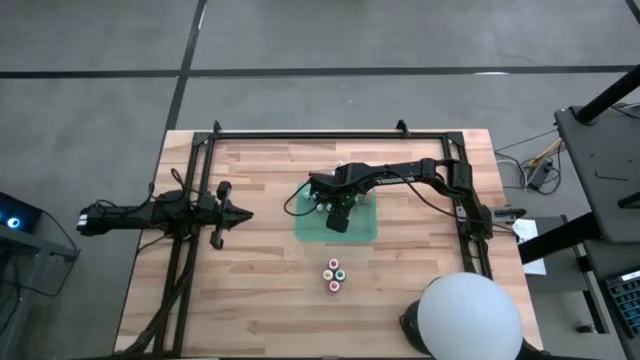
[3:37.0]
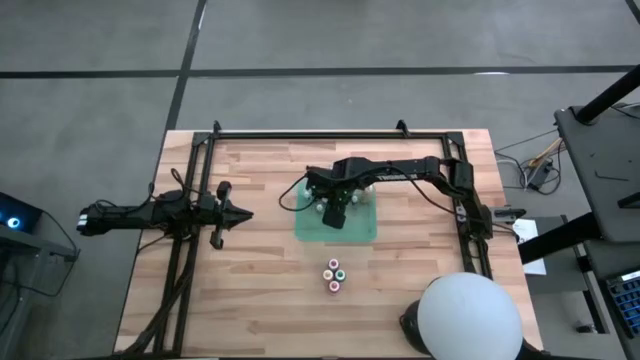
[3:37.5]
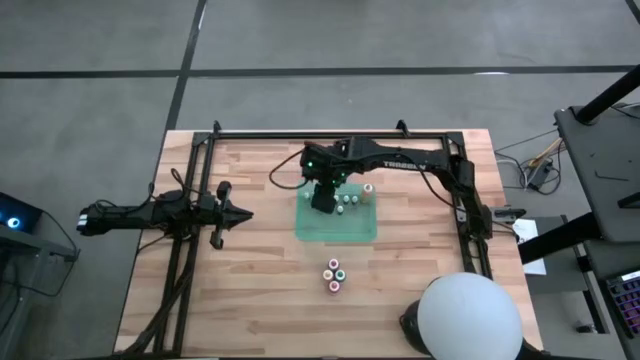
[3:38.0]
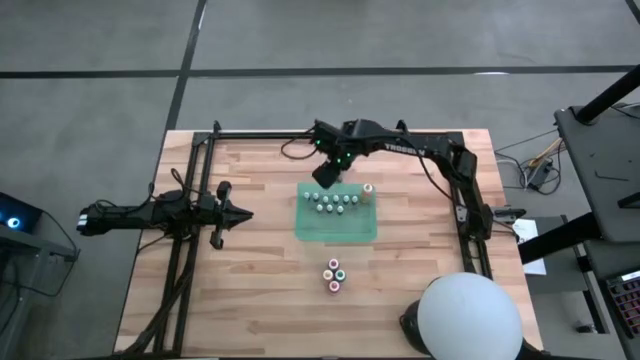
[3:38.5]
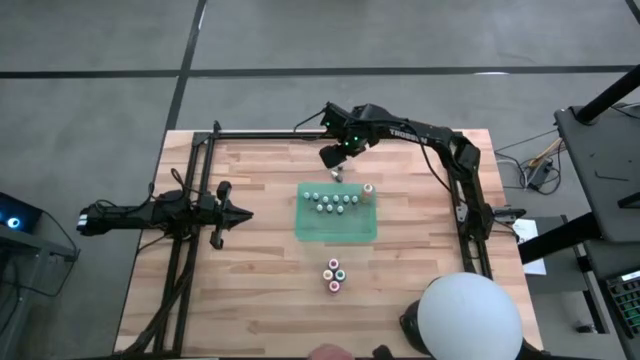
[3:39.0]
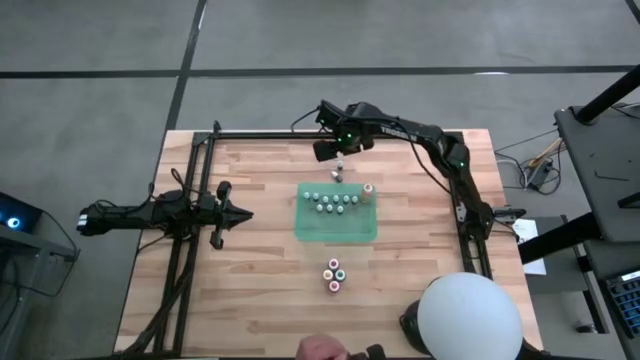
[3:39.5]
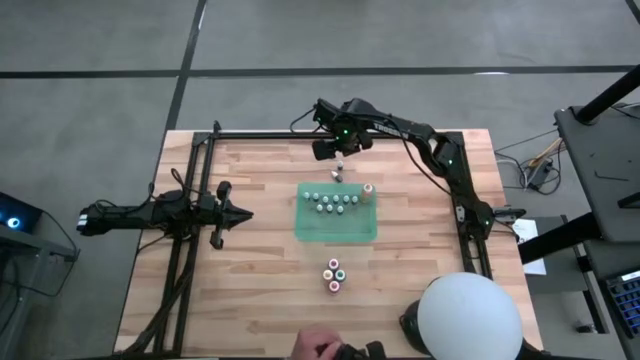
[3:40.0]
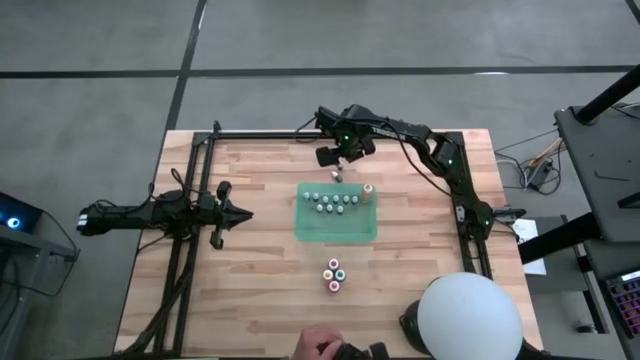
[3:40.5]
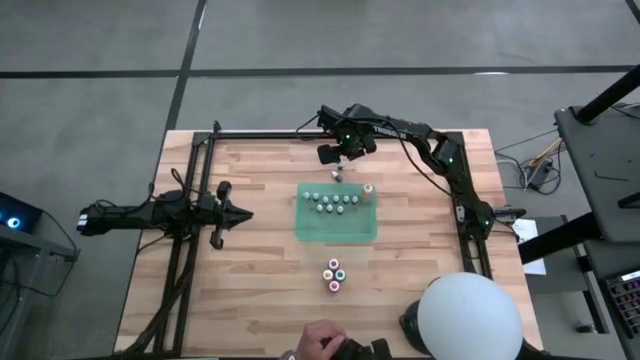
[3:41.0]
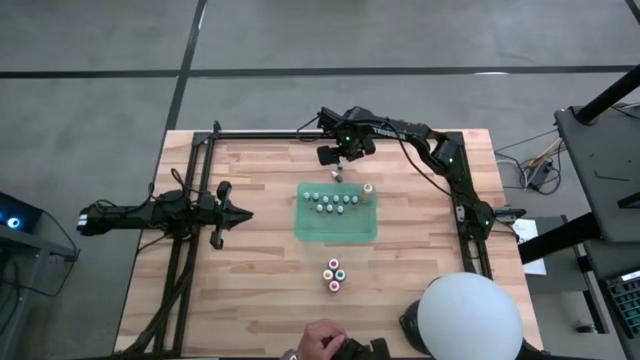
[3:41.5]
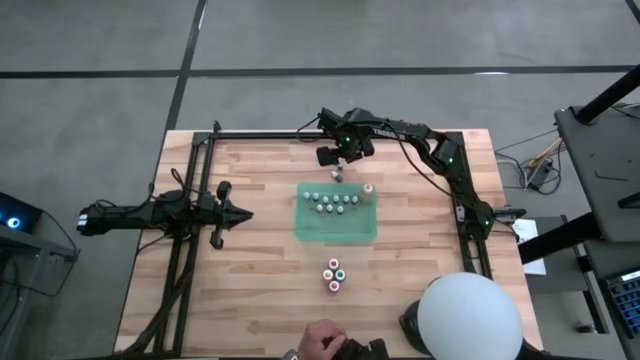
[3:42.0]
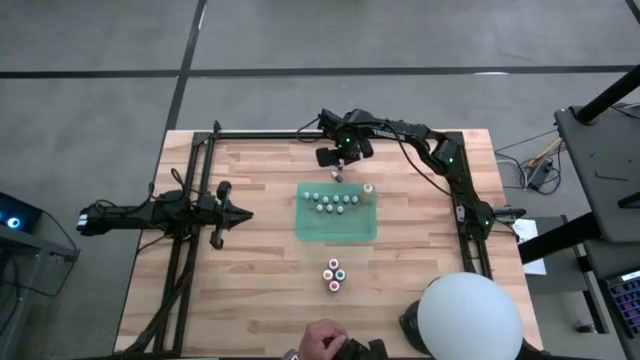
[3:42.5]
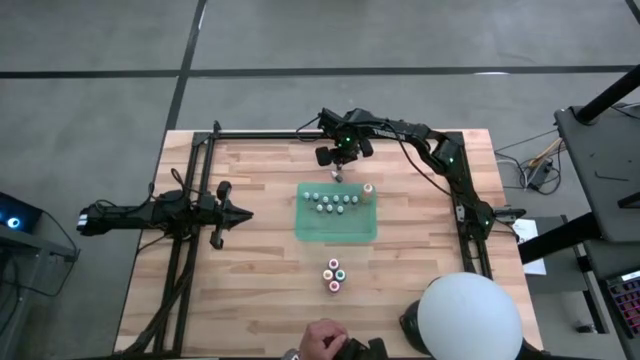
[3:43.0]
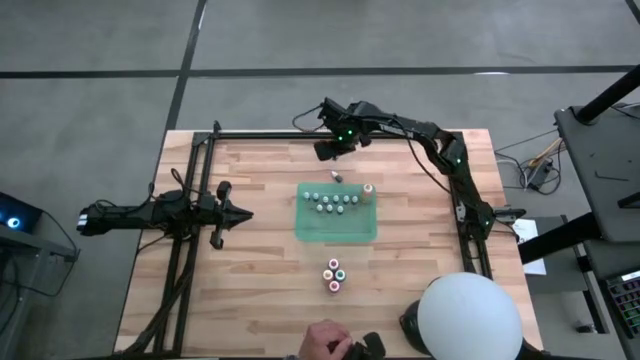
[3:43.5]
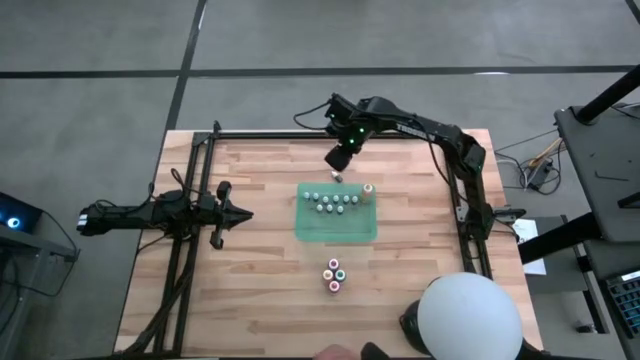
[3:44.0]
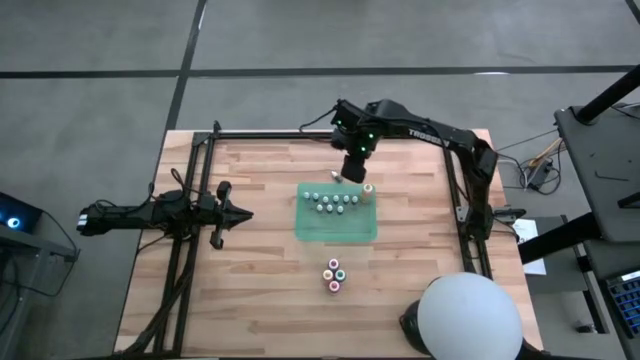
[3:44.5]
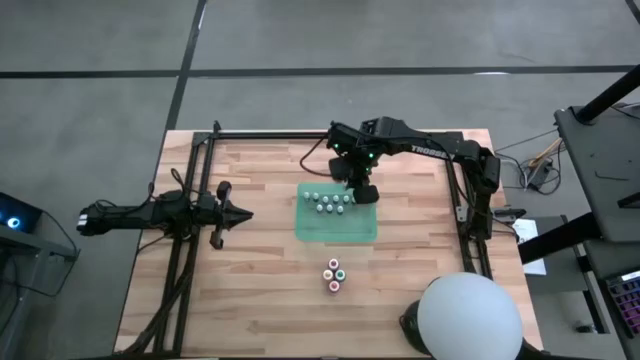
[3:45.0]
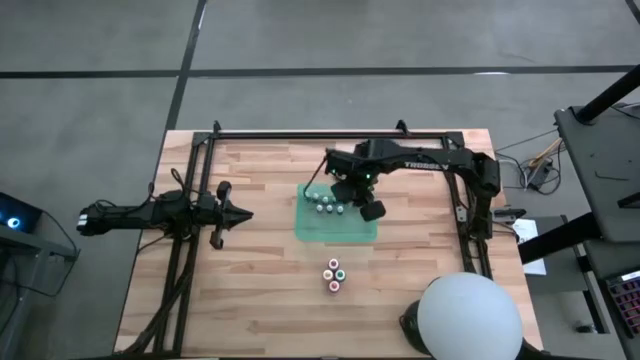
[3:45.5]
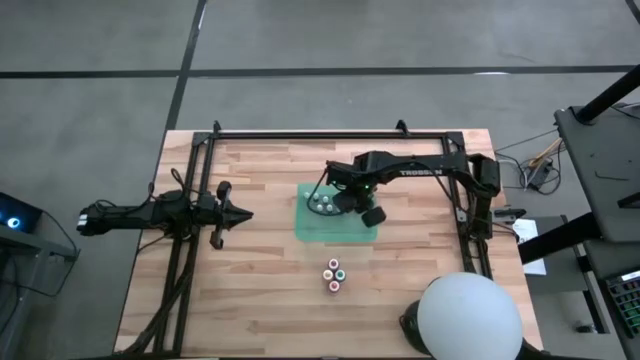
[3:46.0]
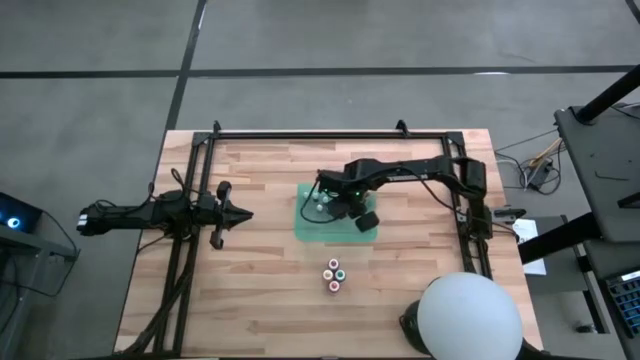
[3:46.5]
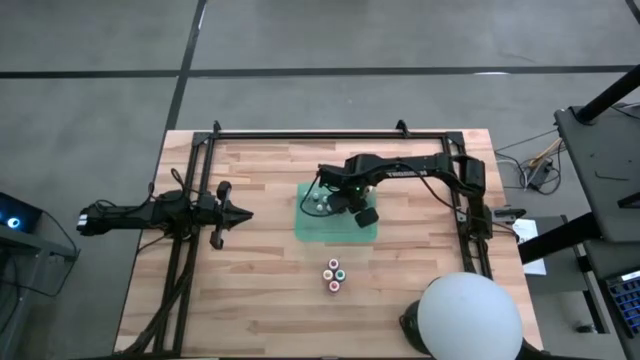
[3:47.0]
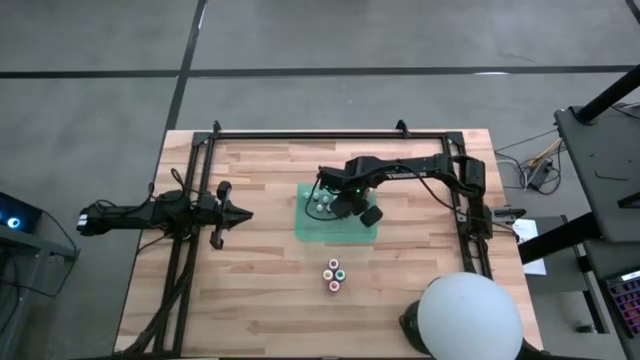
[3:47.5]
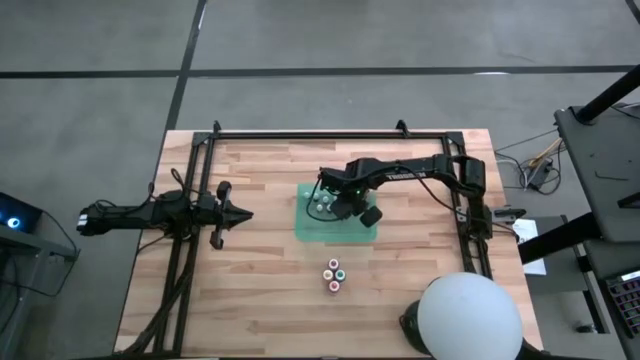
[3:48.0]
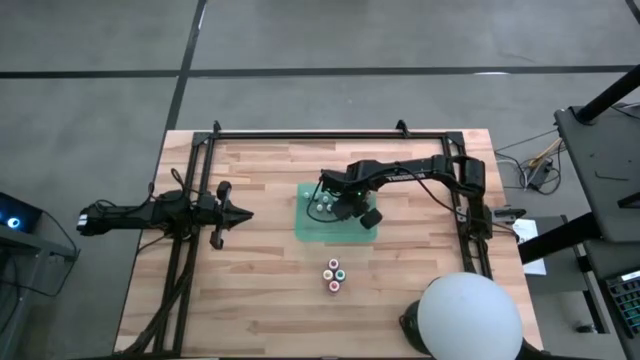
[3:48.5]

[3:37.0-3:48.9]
Task: Pick & Place food coloring
Put the small violet food coloring bottle into the green container

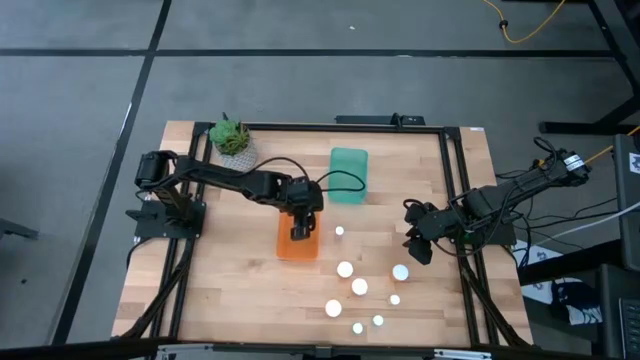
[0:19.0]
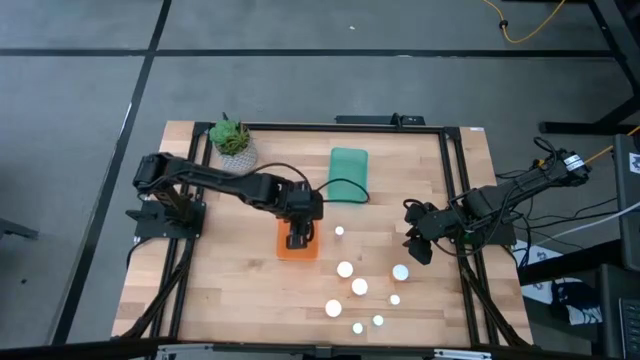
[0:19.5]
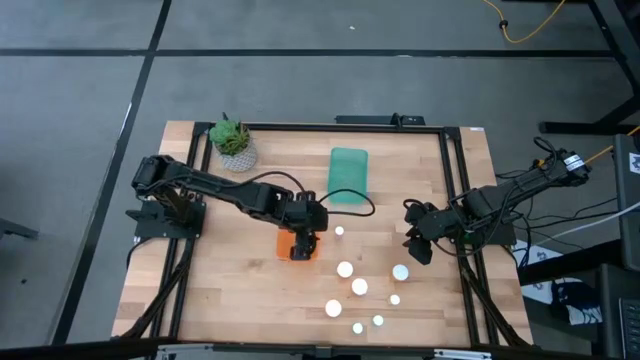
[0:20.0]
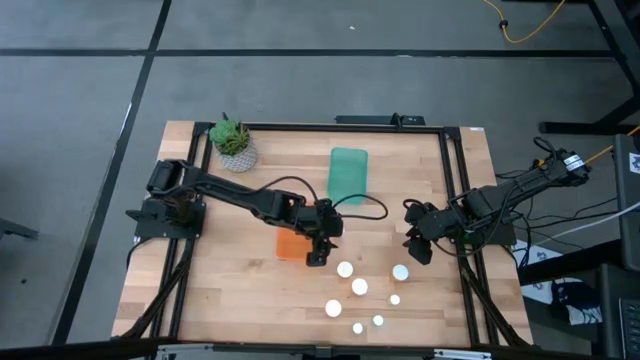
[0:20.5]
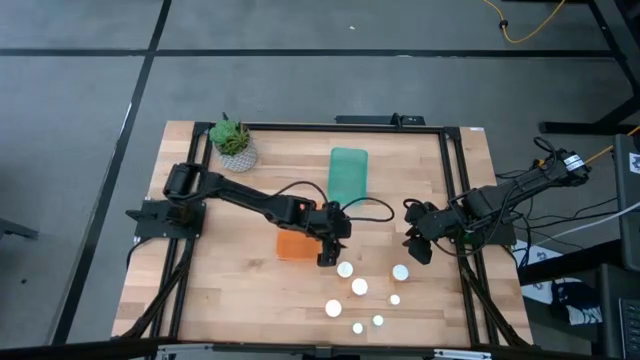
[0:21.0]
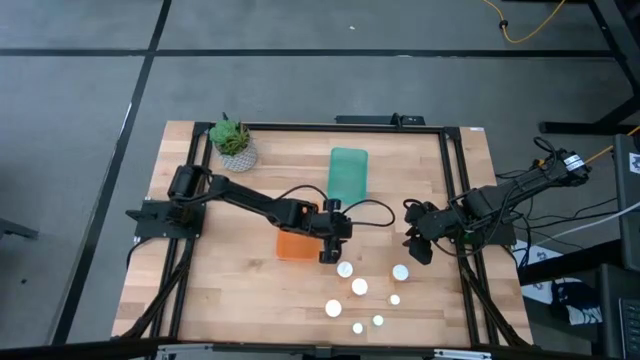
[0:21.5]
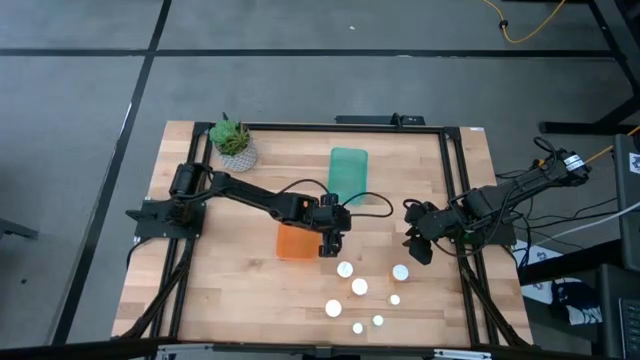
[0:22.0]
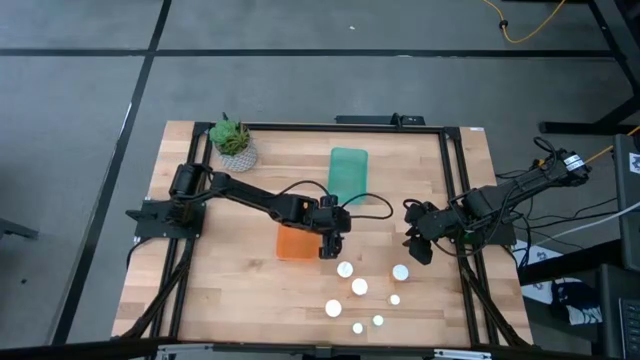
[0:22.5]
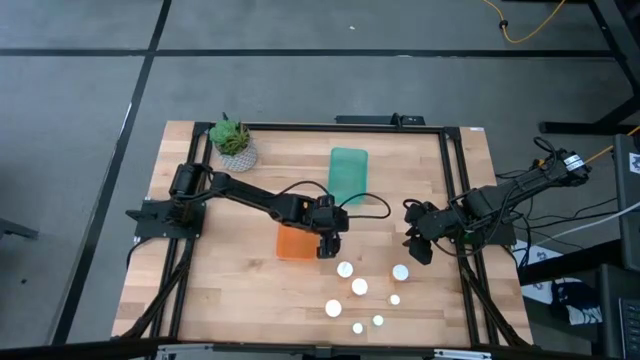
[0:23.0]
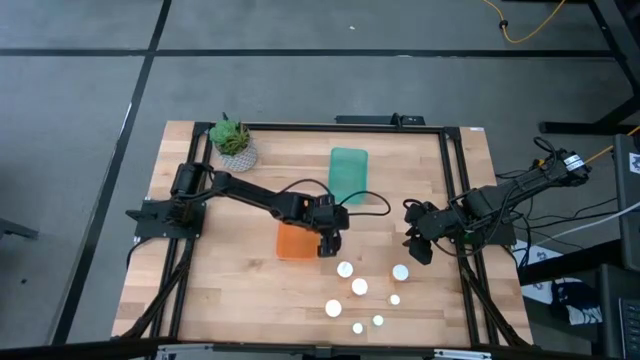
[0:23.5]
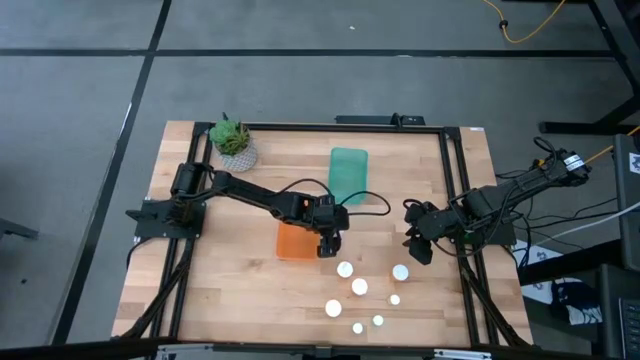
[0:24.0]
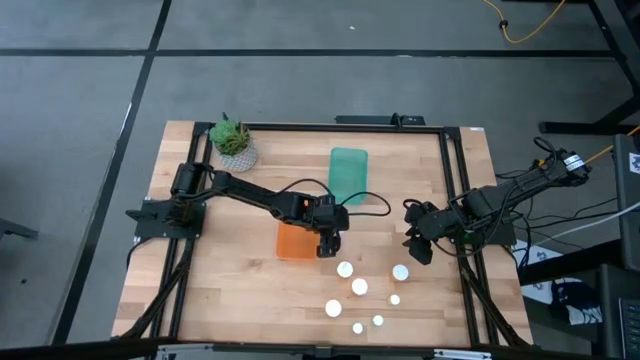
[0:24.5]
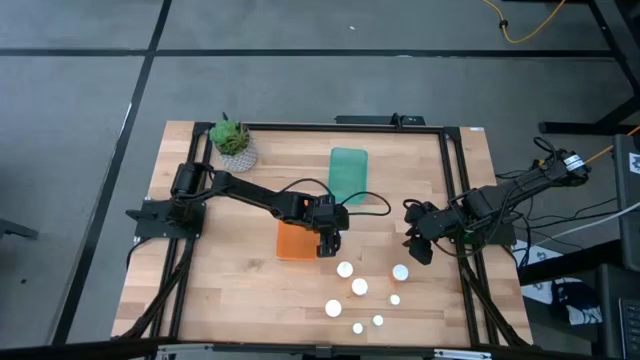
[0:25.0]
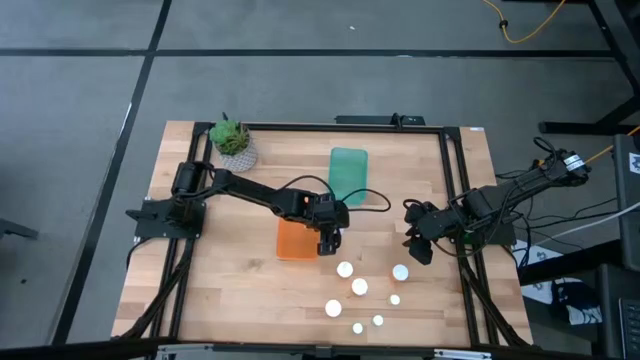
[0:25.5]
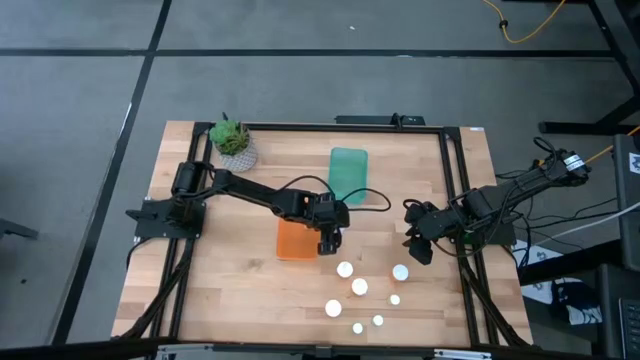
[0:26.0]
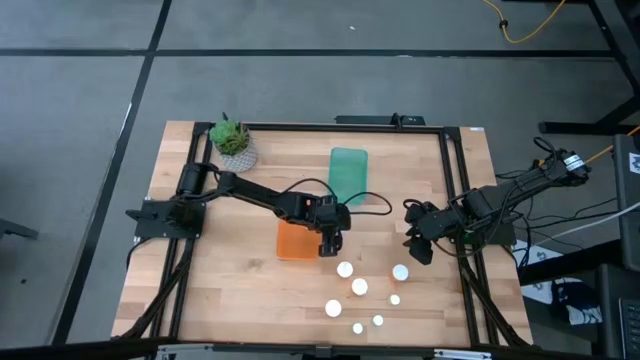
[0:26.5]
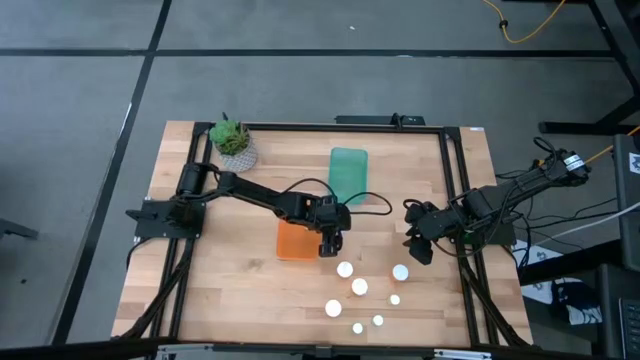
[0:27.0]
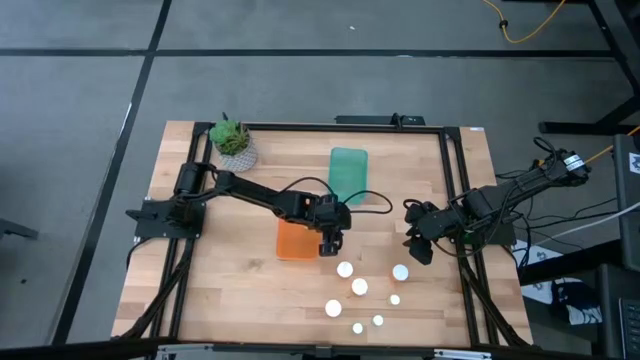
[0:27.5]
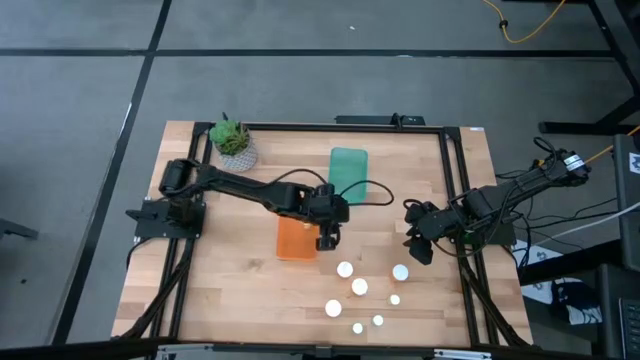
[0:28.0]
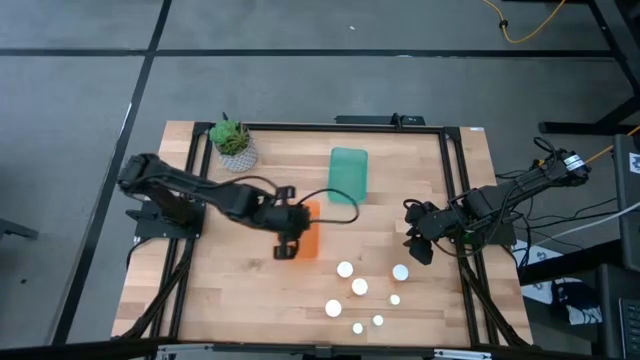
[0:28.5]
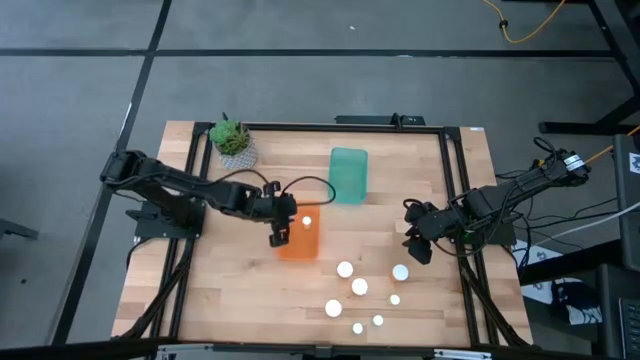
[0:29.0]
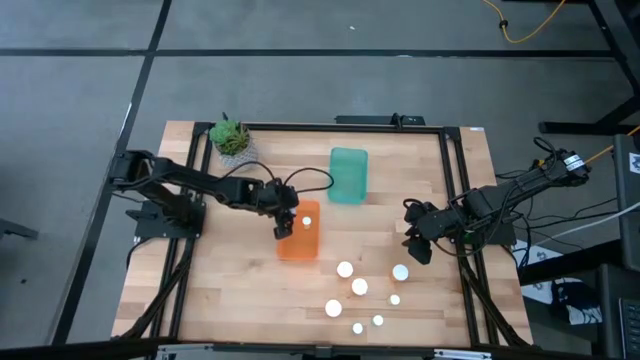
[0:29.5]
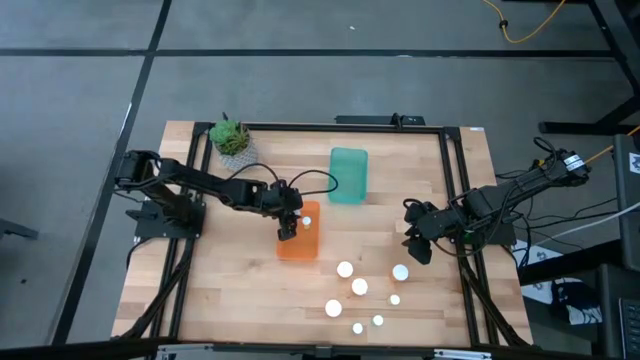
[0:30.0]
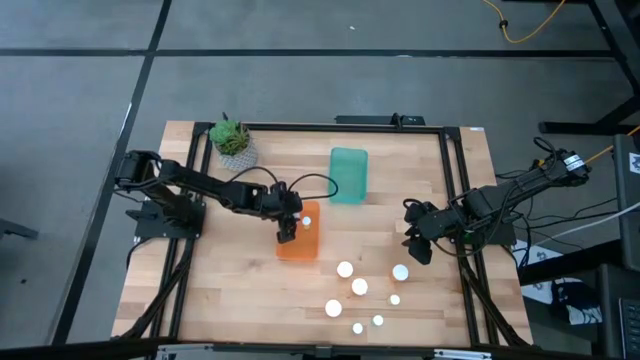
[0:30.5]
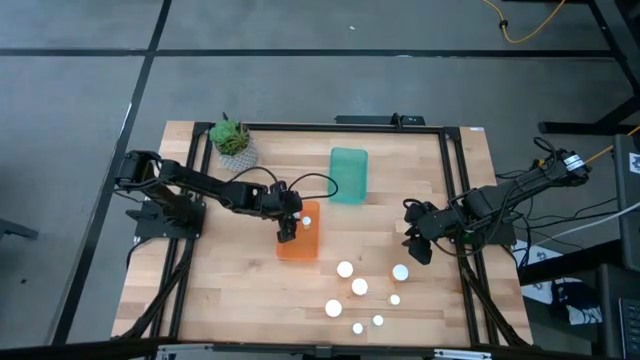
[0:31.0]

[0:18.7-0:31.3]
Task: Pick and place medicine bottles into bin by pill shape (circle, oval)
Put the small pink pill bottle into the orange bin
